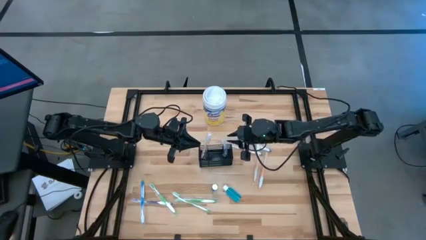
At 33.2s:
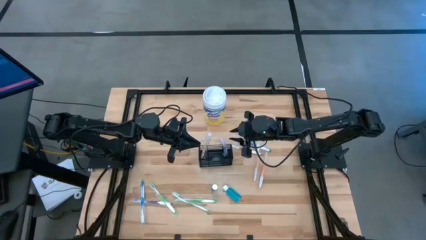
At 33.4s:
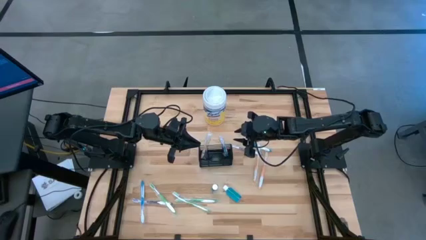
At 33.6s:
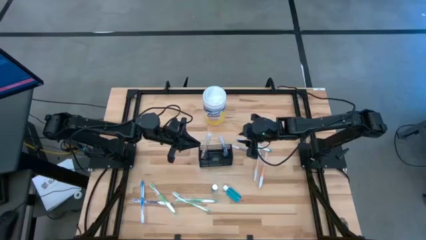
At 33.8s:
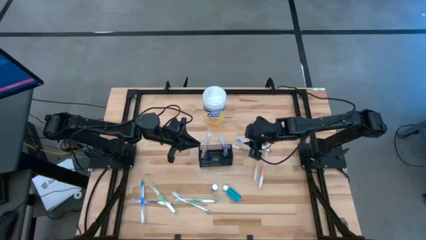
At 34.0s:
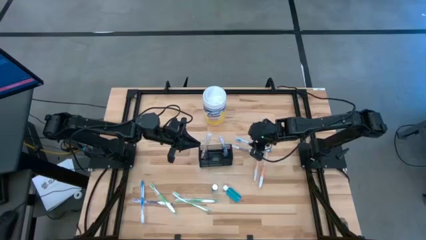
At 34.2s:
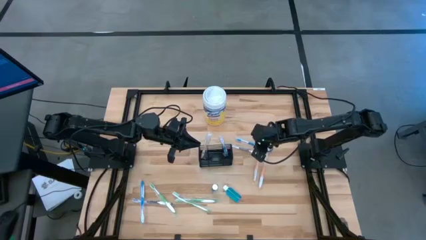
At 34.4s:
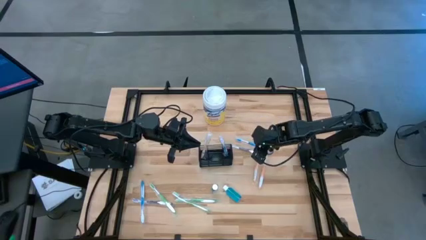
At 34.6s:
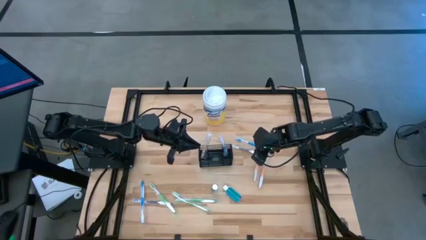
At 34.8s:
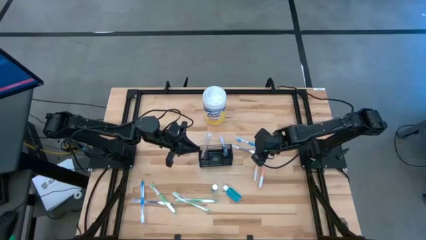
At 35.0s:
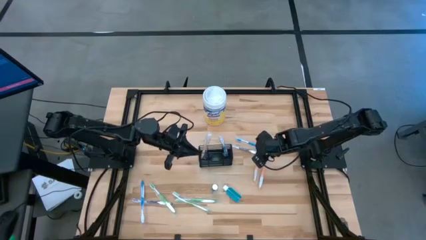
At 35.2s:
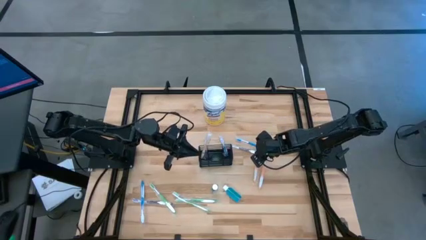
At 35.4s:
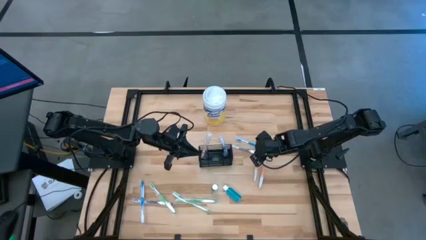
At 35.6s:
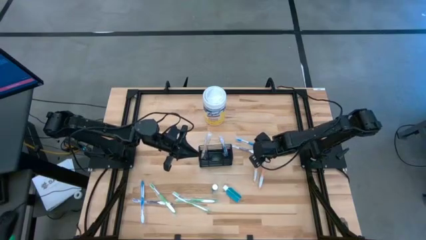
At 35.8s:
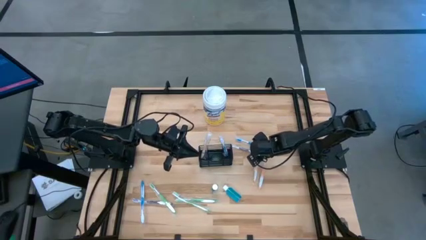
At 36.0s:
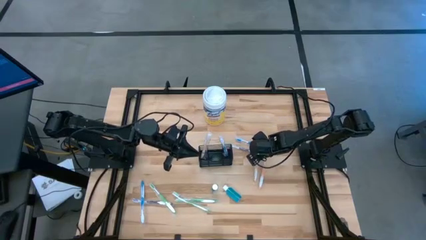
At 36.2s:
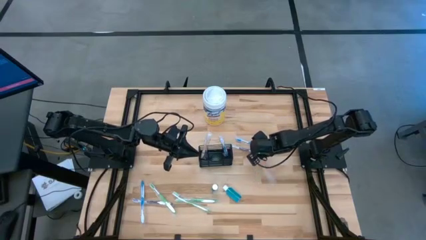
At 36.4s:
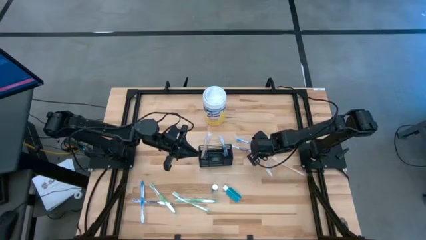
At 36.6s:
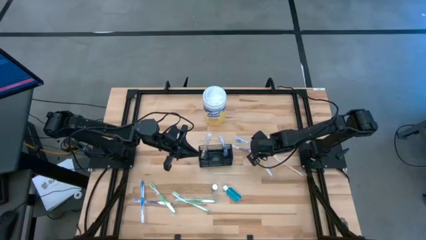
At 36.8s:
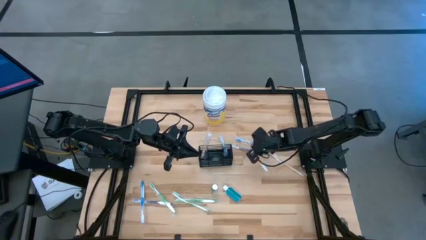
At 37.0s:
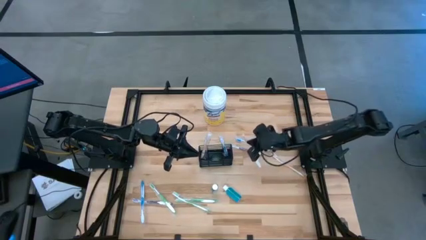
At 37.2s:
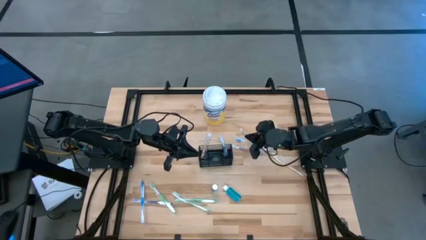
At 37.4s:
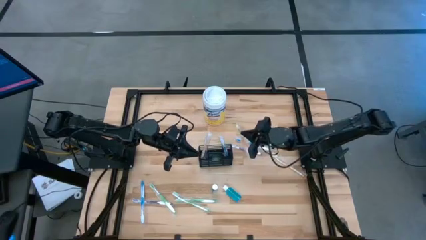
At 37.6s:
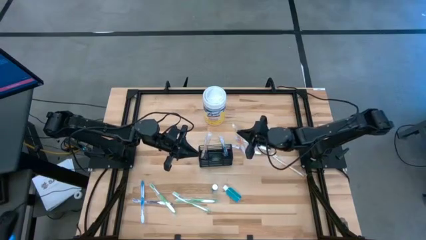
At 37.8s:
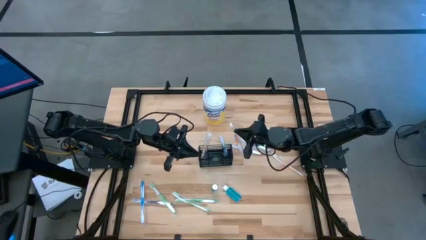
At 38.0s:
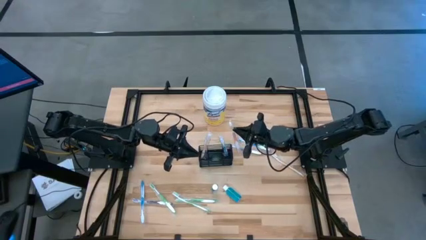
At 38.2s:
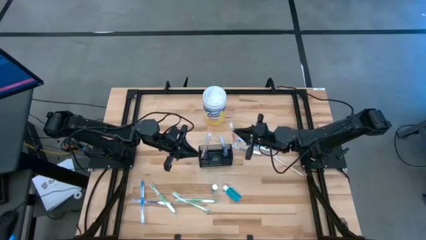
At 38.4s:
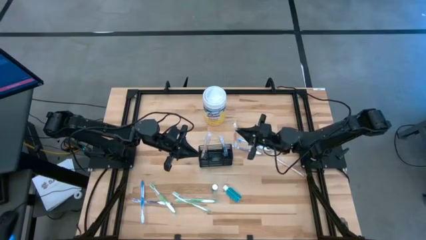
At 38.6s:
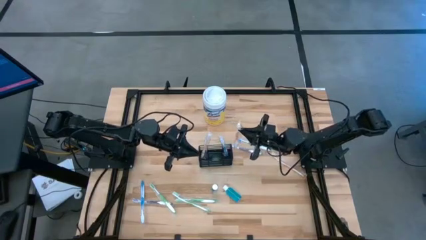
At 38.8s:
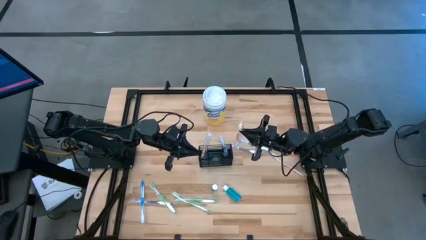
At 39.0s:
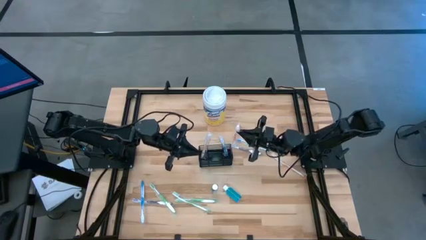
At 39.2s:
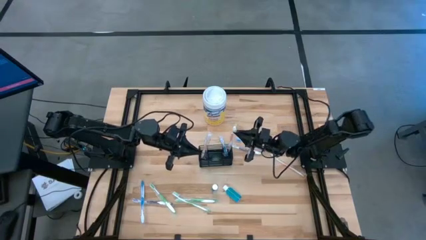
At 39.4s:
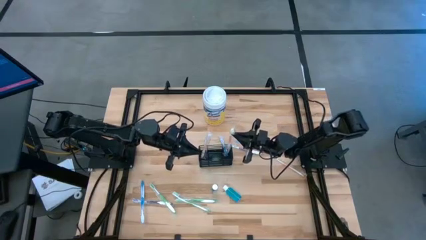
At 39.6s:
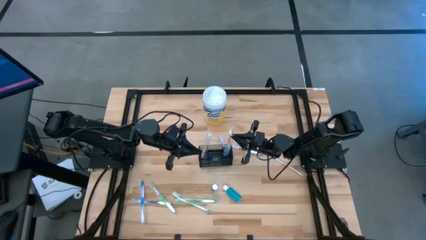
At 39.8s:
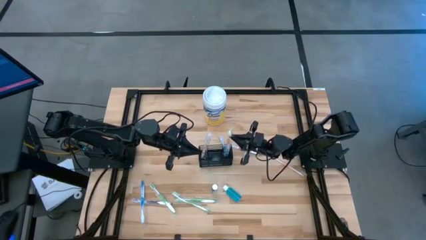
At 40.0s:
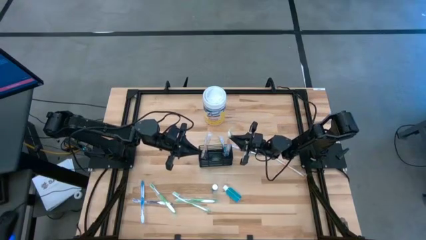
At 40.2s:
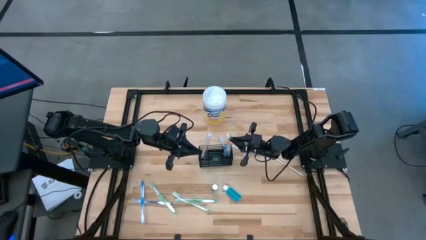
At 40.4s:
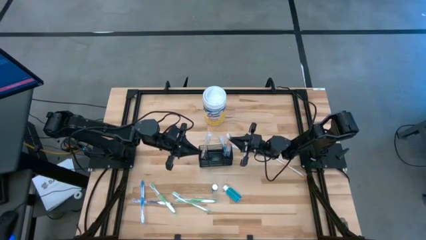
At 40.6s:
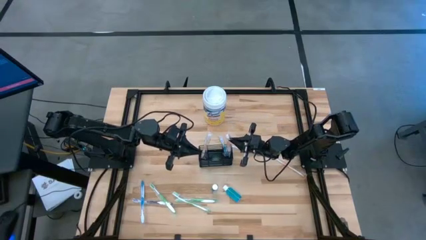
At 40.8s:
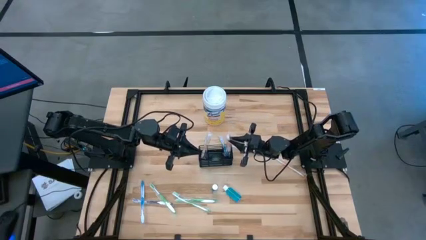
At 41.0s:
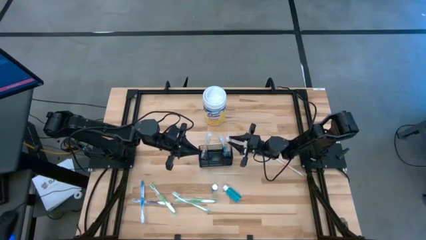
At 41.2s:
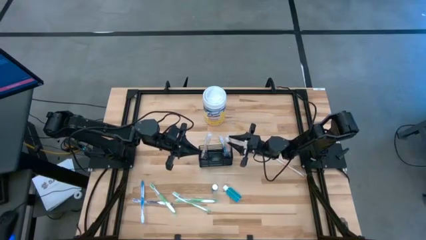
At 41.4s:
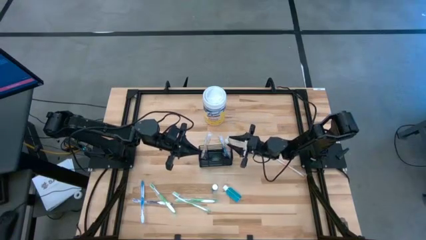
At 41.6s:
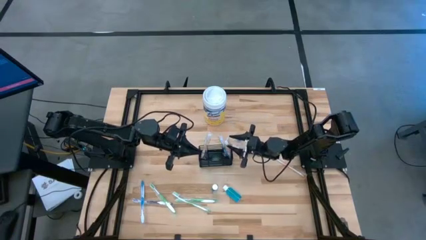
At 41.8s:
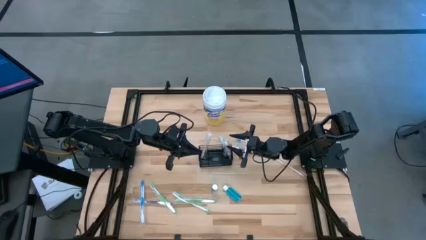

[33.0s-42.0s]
Task: Pick & Place toothbrushing station
Put the right orange toothbrush into the mesh organizer

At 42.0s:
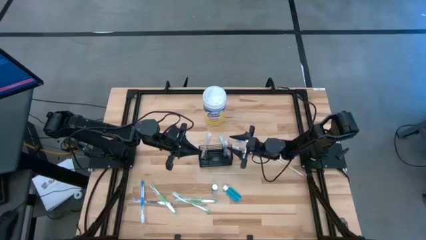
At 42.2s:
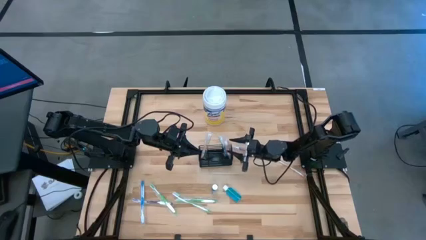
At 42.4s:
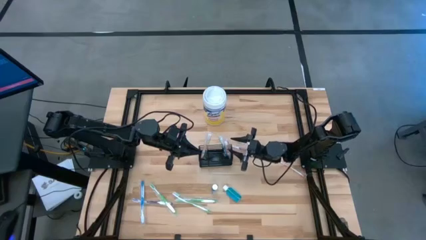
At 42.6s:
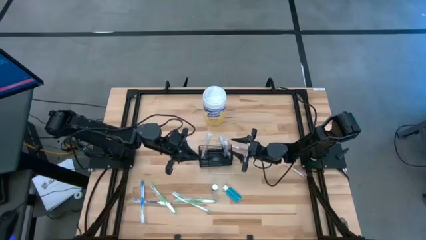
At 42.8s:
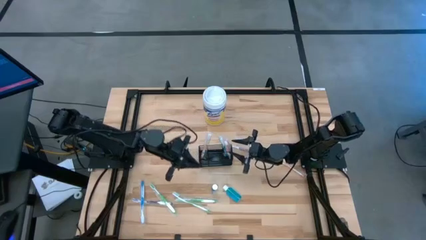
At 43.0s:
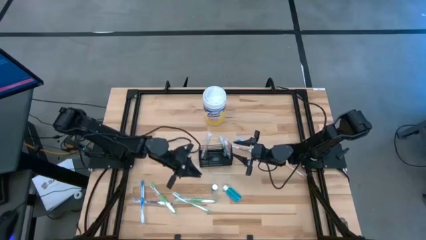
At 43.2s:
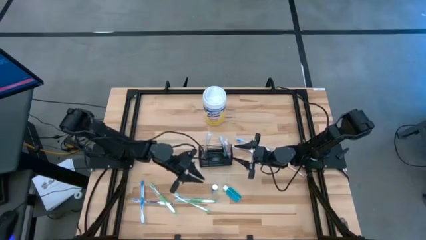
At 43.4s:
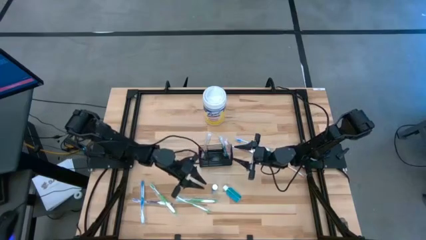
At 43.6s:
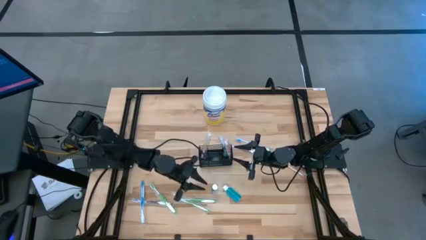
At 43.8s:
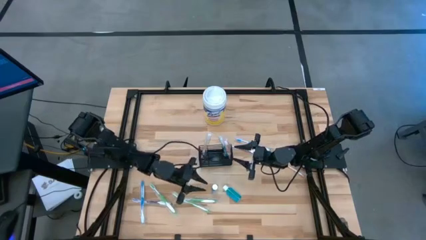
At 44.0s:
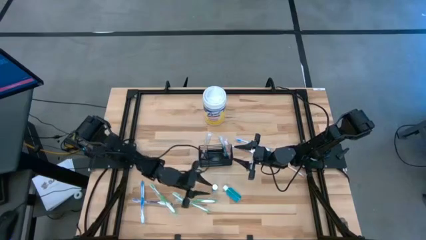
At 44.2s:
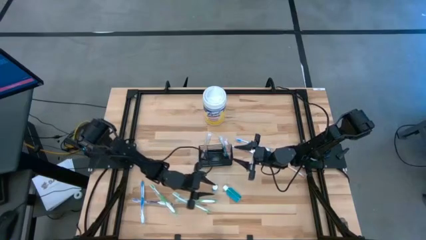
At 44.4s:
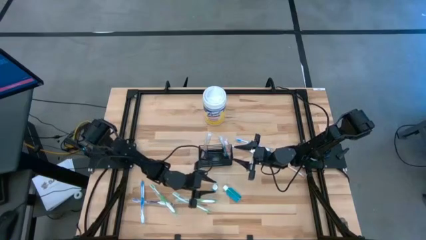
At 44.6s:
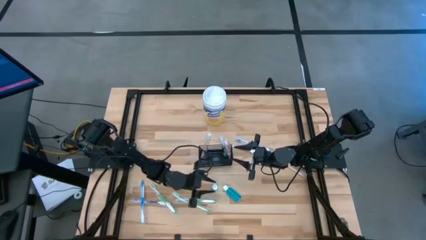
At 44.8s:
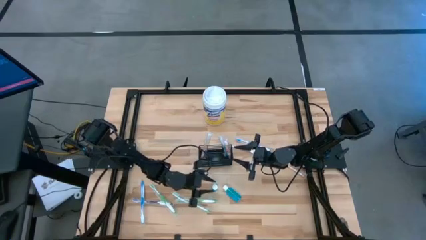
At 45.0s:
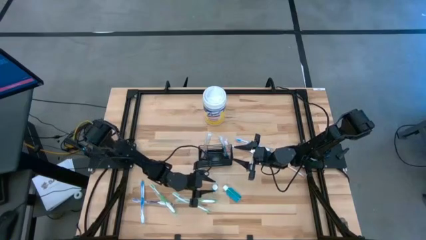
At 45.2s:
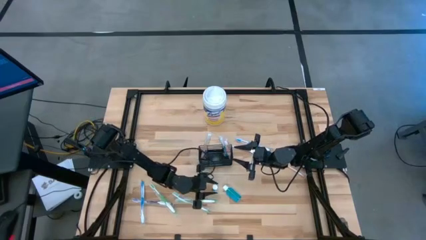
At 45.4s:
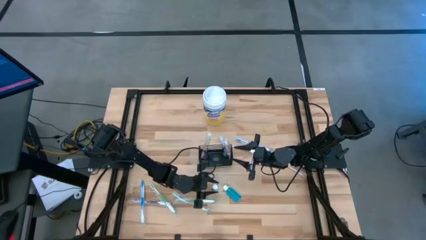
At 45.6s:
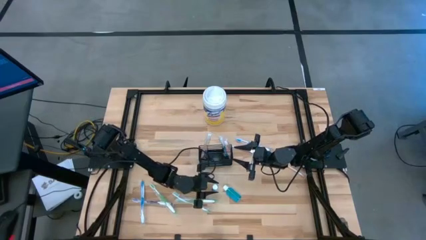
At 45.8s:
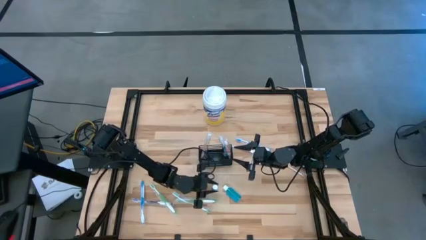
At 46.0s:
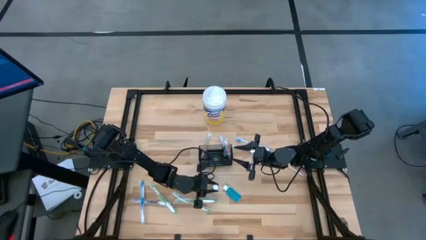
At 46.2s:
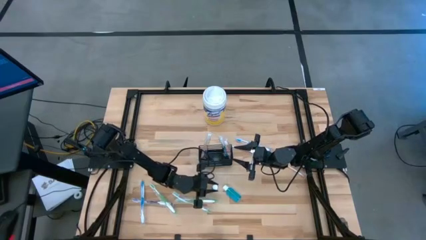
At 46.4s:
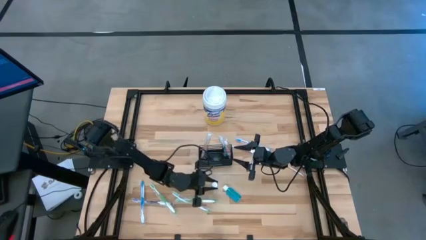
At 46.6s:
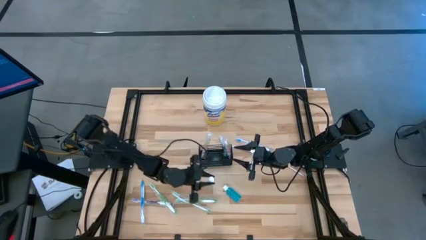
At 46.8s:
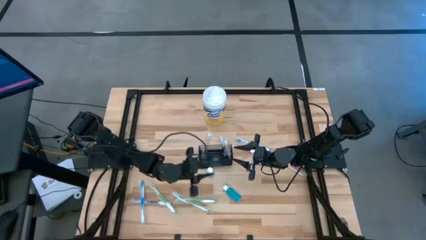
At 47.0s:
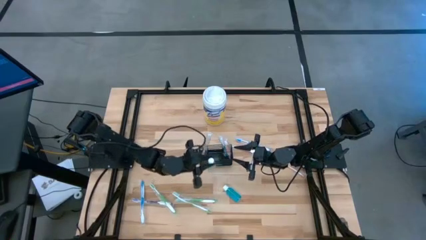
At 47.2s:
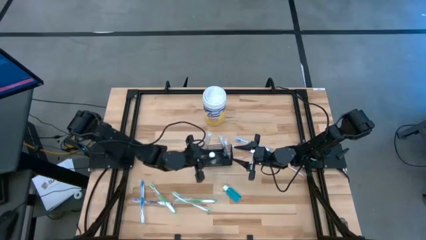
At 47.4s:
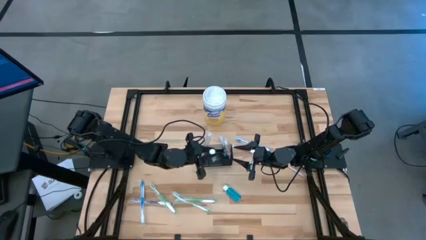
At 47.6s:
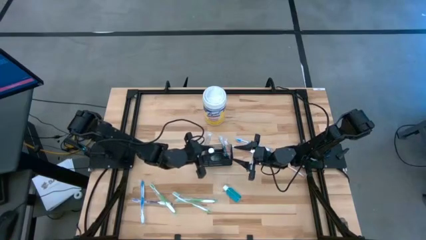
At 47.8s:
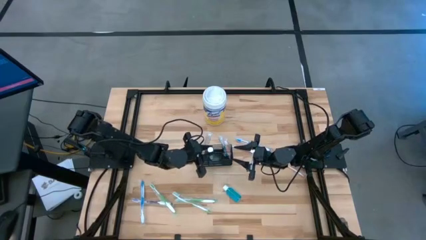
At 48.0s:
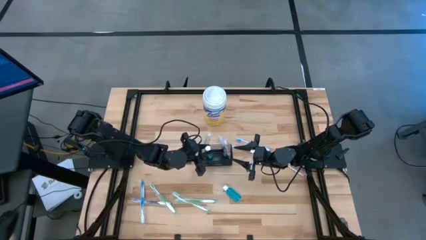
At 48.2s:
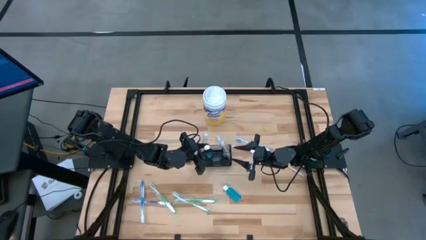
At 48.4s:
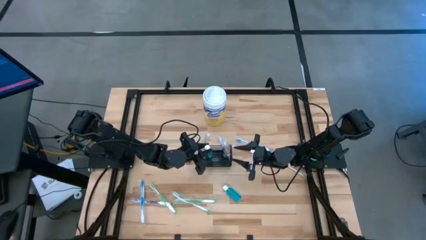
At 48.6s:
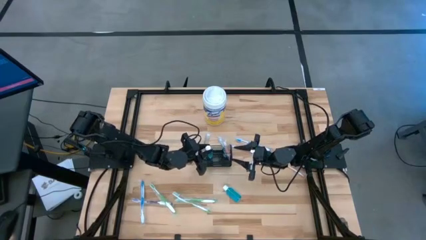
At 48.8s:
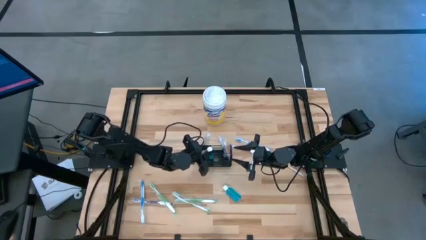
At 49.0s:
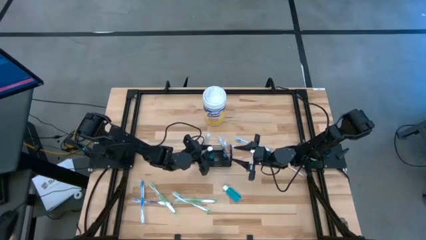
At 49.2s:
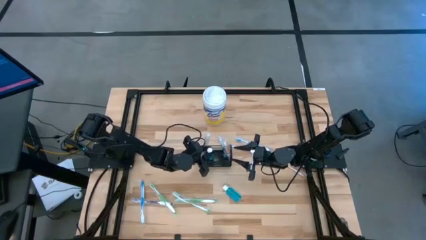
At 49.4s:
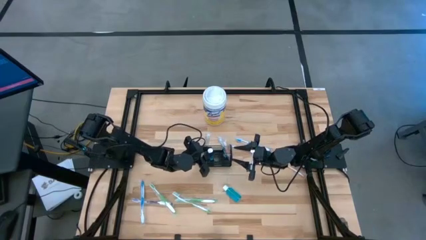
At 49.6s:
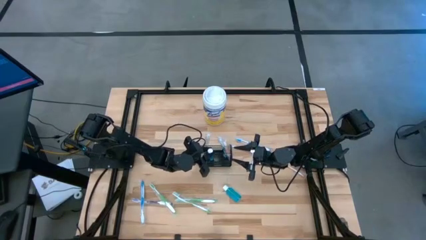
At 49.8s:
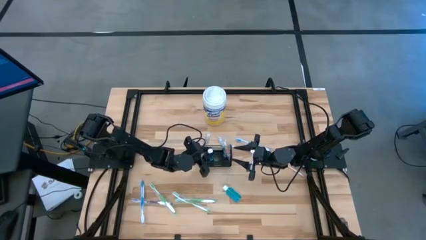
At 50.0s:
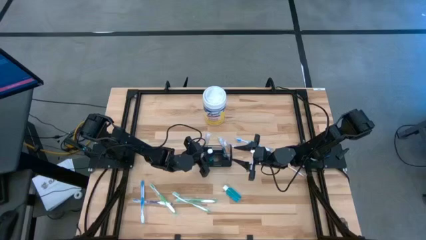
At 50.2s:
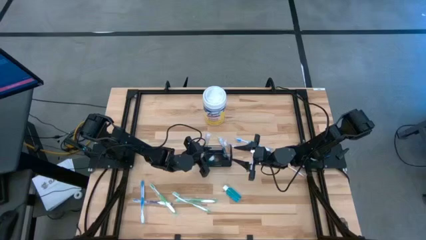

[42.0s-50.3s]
Put the left blue mouthwash into the mesh organizer
